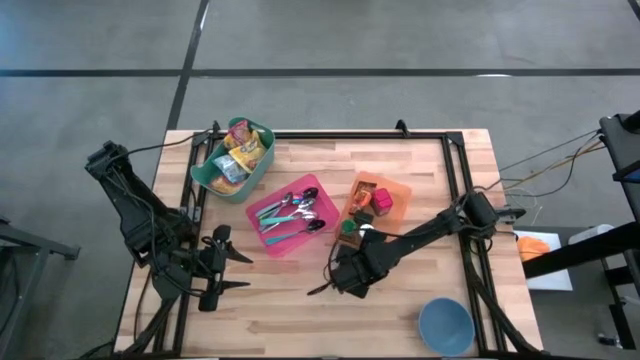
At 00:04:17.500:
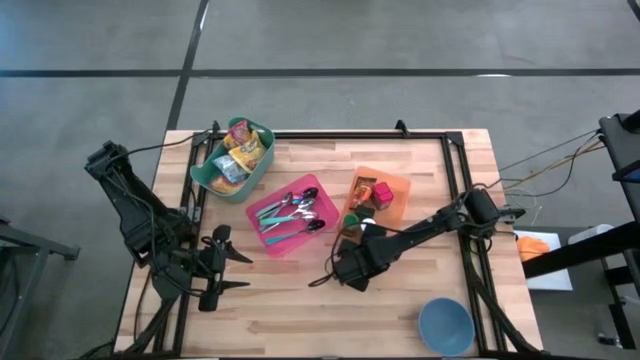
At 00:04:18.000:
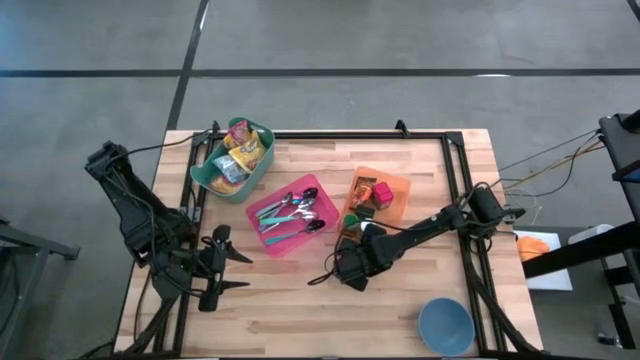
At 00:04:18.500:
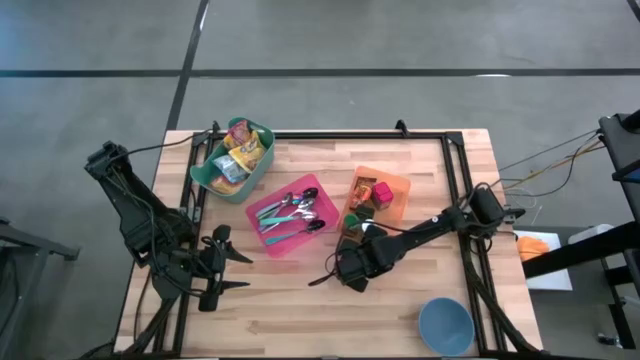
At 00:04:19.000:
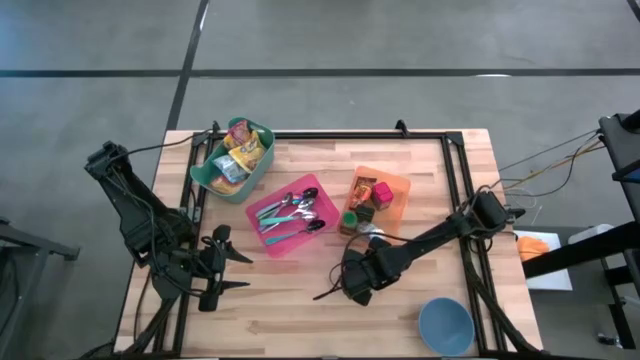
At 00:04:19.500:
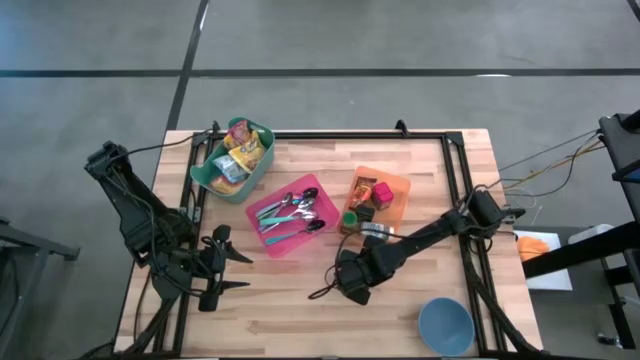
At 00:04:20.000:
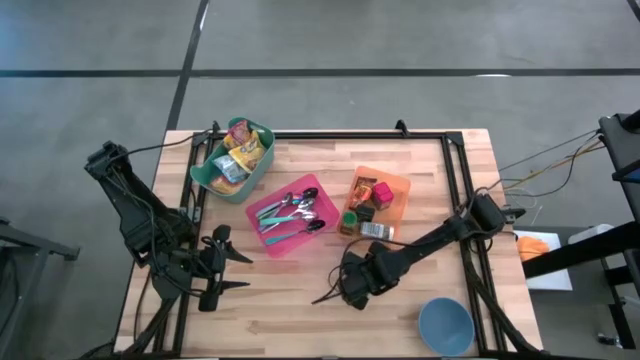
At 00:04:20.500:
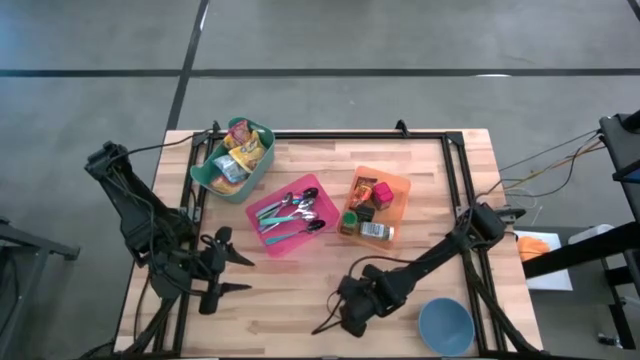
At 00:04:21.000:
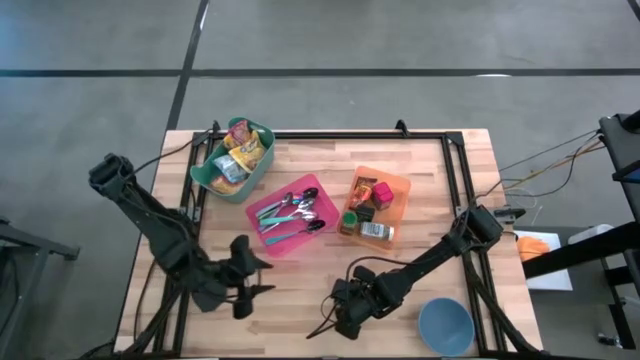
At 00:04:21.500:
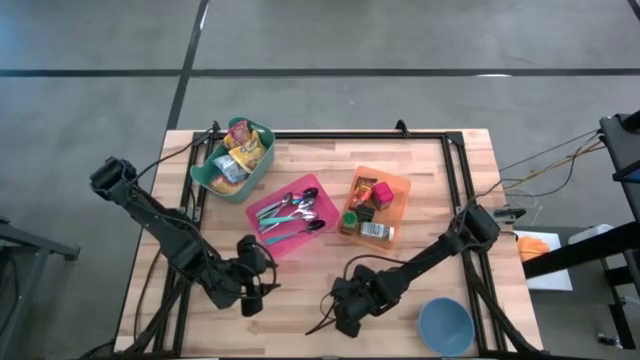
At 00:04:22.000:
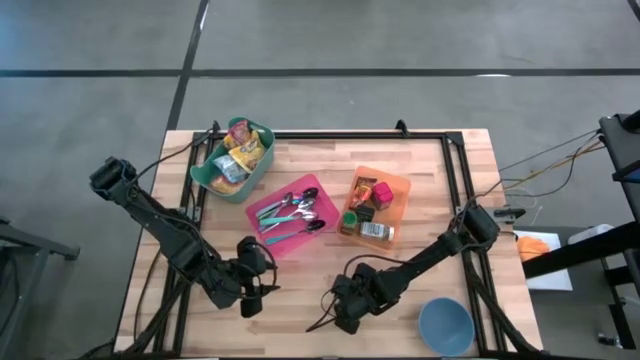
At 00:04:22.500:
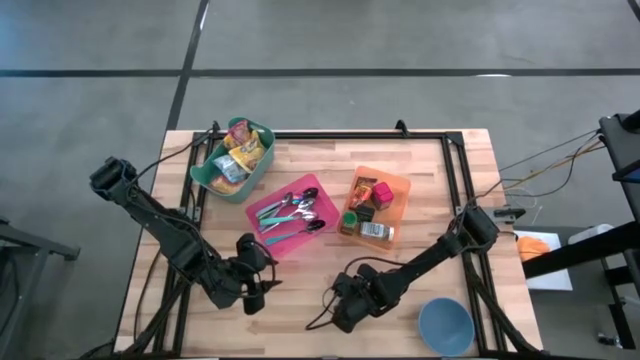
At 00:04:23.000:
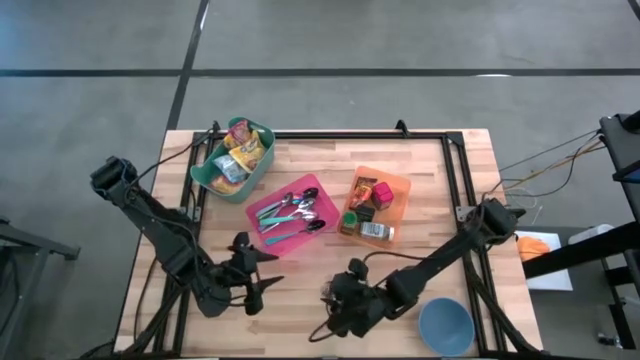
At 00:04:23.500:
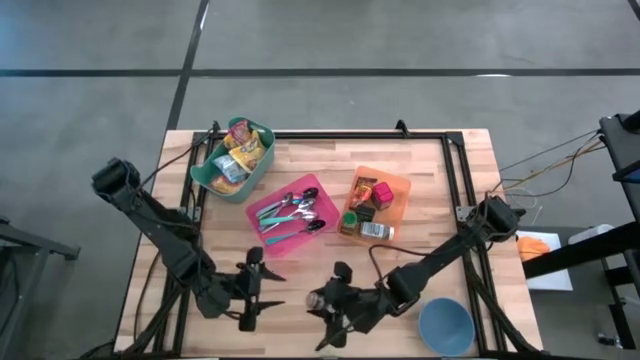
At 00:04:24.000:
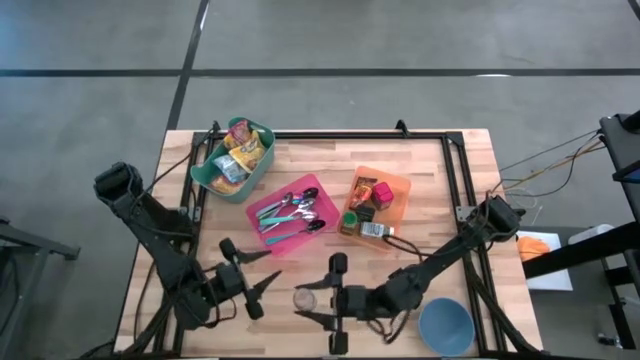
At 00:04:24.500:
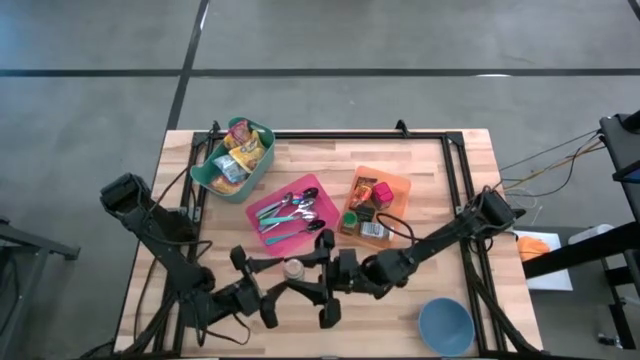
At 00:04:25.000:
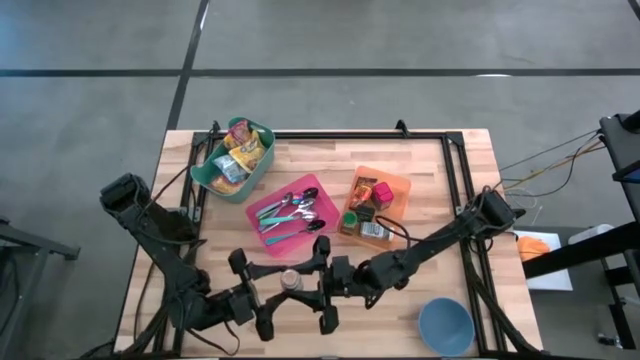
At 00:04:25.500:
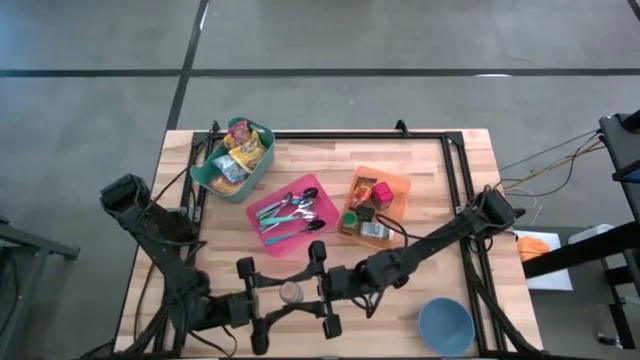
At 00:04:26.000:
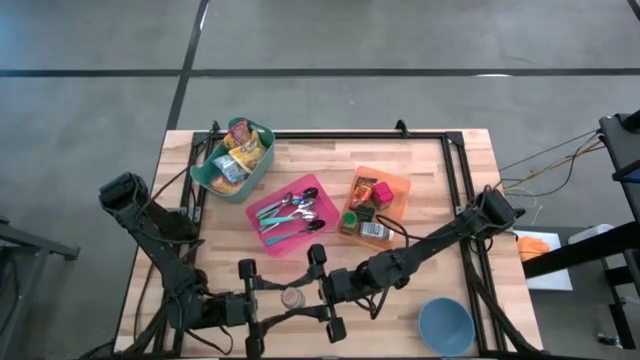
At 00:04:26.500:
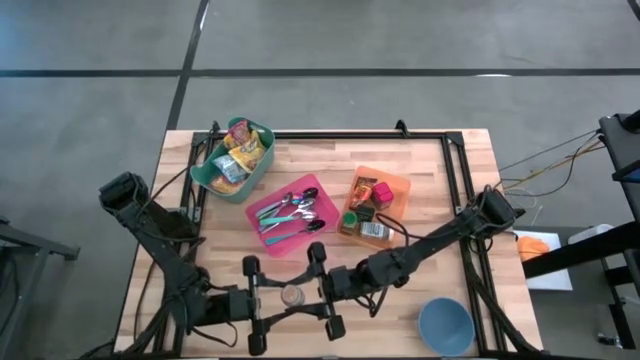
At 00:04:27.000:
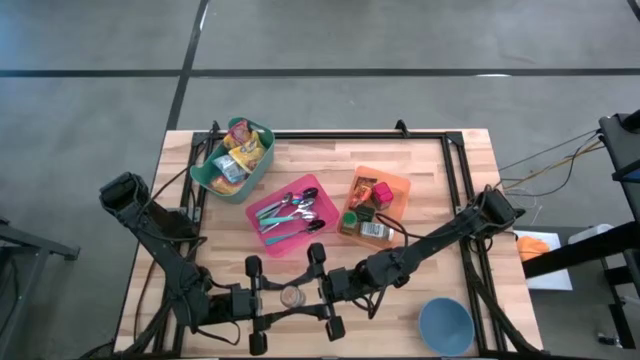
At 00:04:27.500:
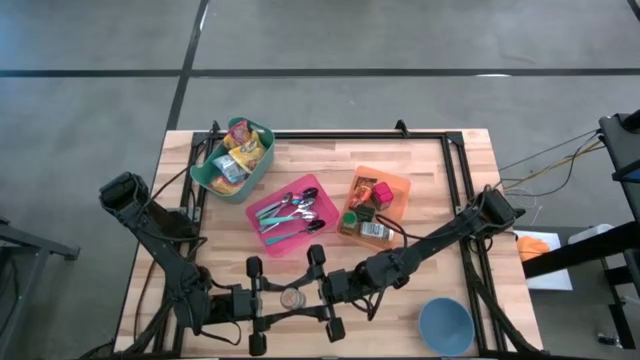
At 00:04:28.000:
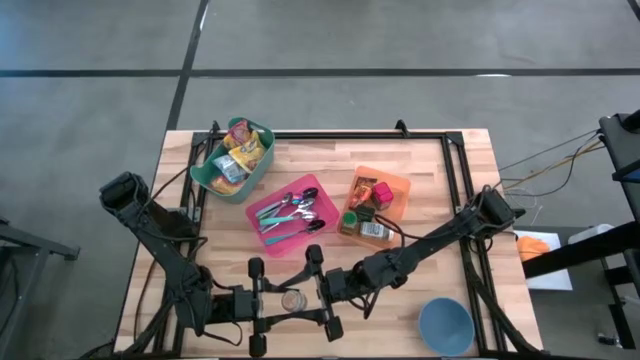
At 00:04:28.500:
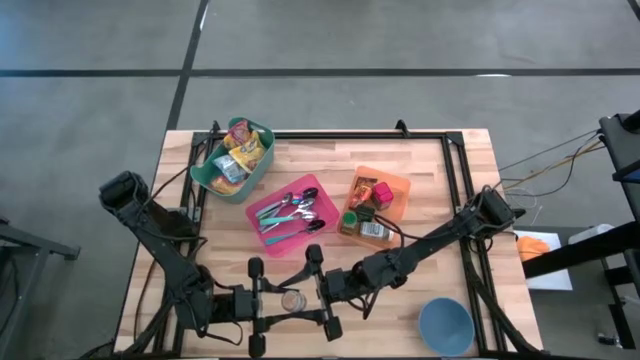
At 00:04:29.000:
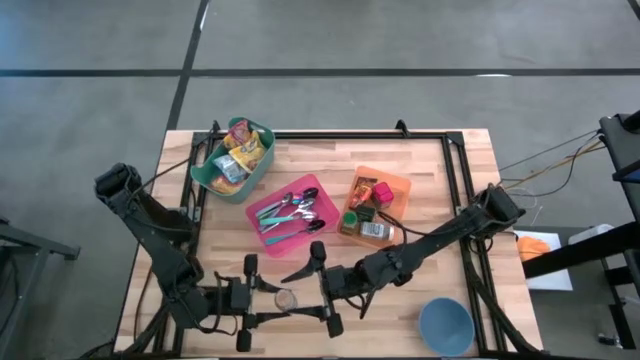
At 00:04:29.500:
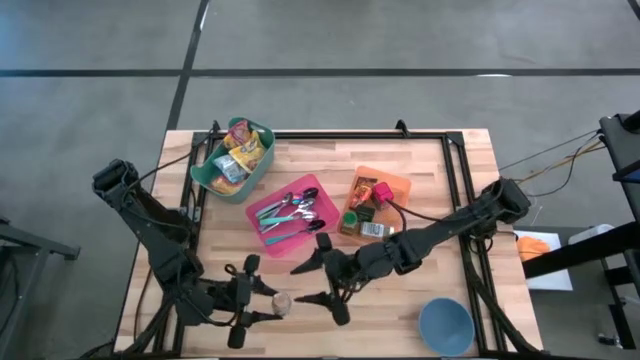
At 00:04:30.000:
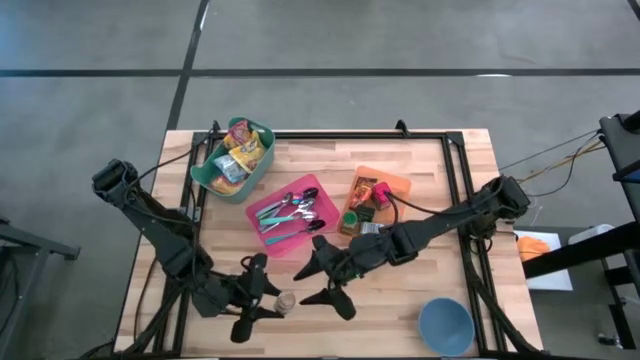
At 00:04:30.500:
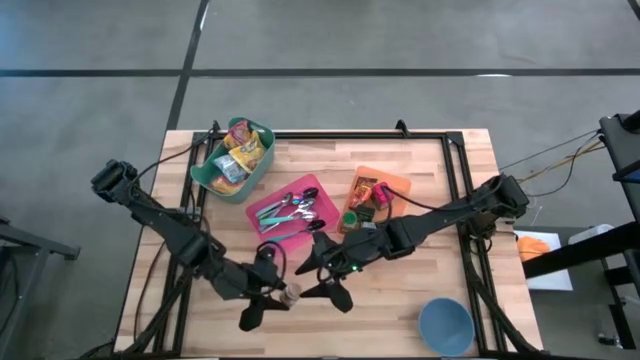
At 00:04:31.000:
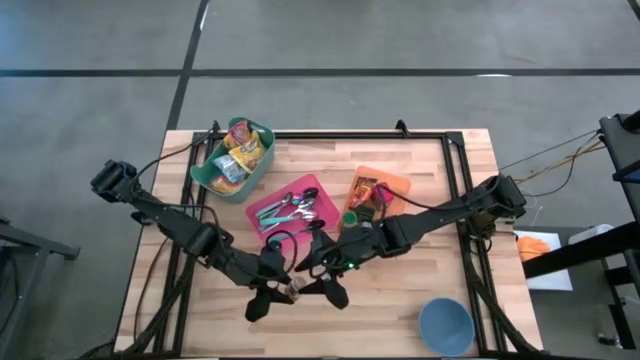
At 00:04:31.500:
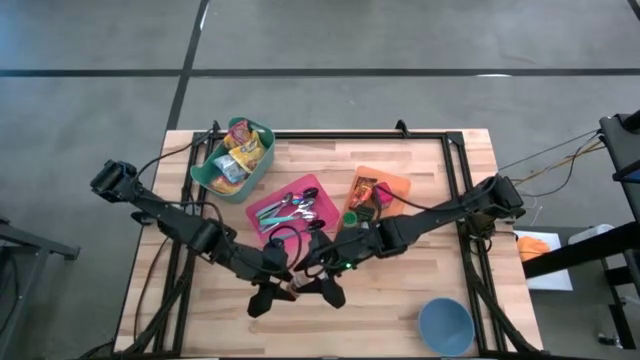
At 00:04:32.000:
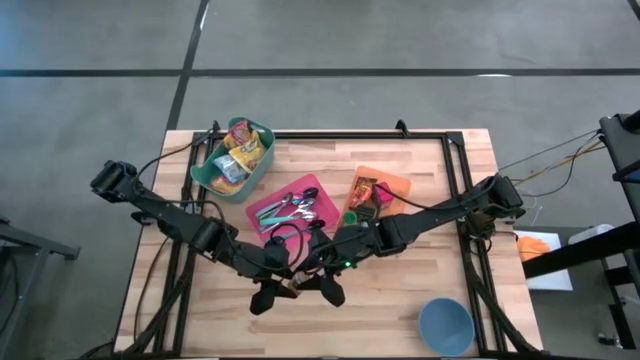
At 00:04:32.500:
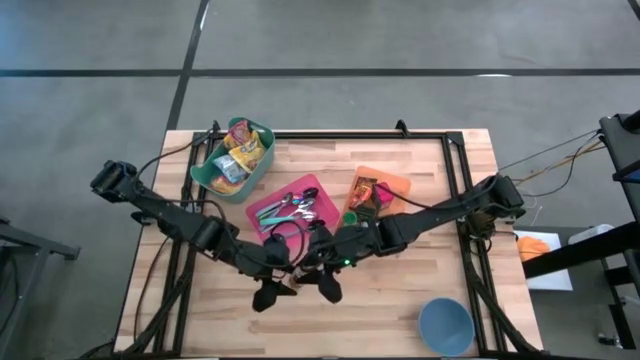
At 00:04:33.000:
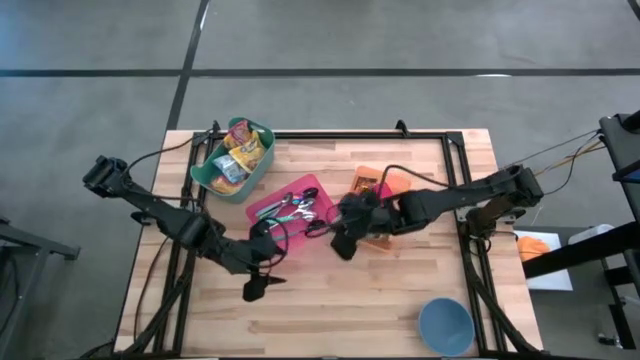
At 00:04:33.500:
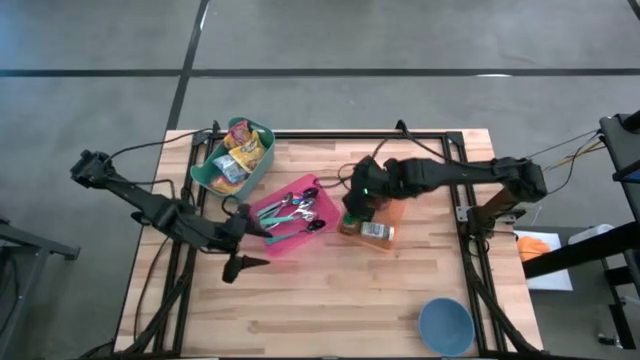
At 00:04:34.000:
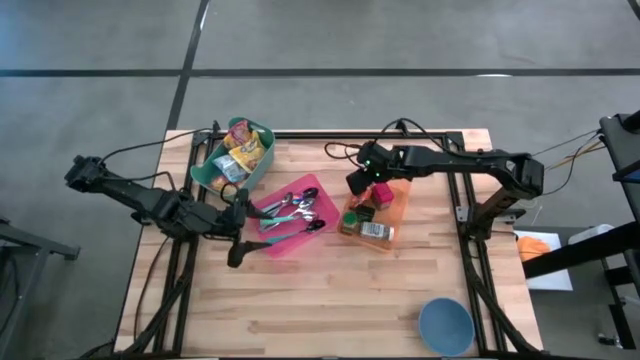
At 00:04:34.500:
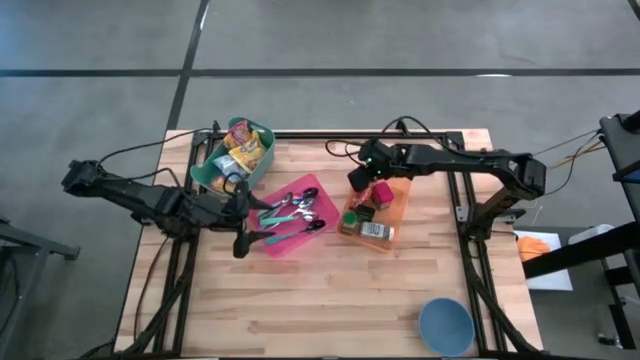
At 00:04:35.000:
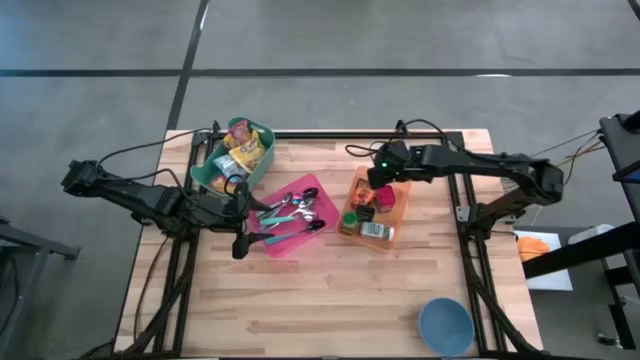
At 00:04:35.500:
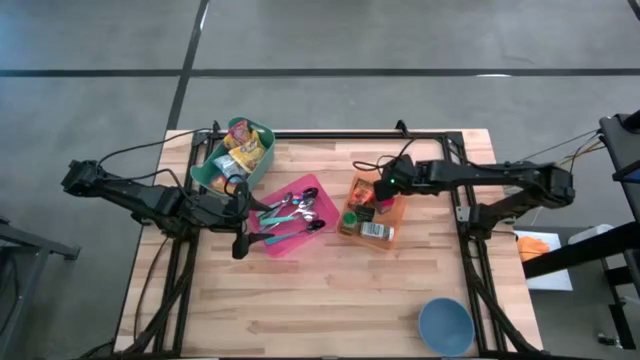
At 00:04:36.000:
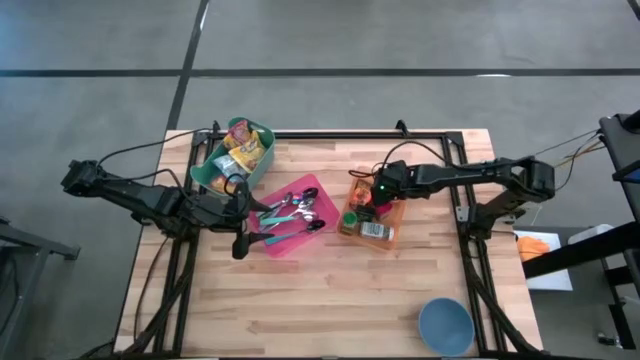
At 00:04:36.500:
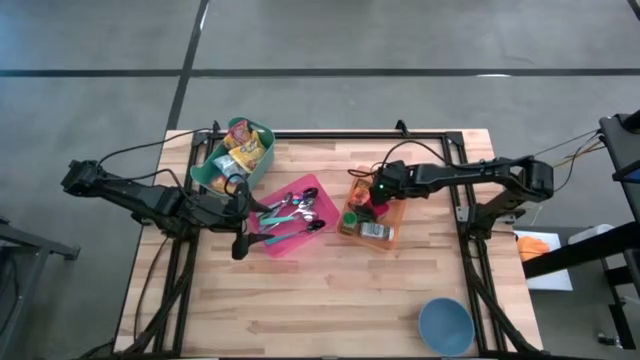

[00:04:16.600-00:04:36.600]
Put the brown seasoning bottle into the orange bin
